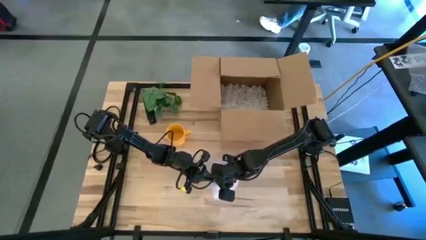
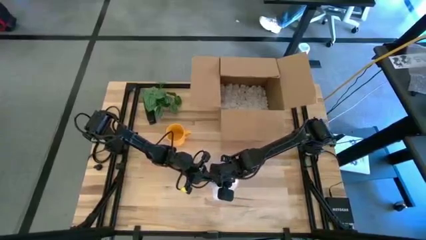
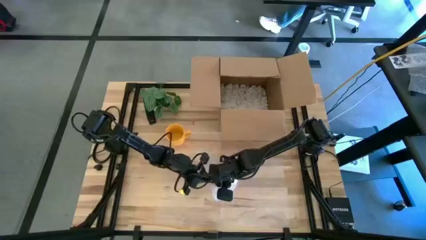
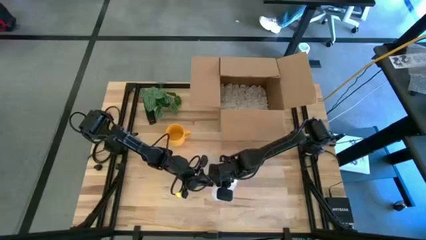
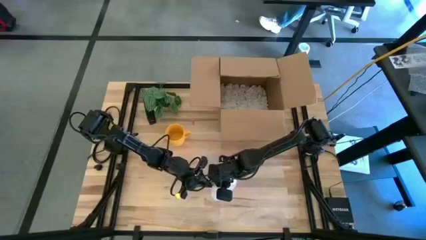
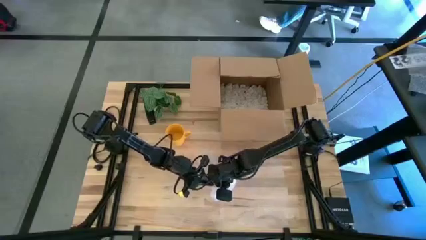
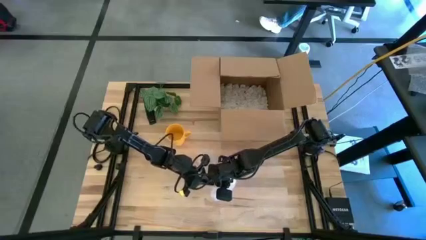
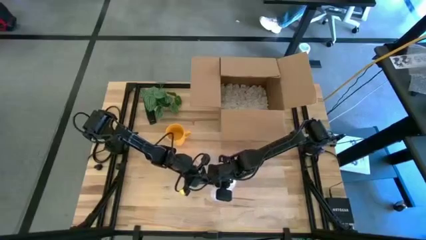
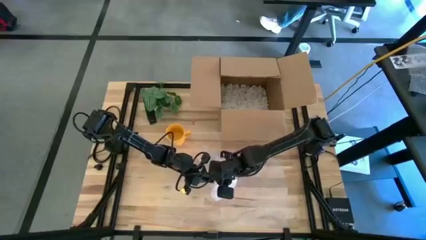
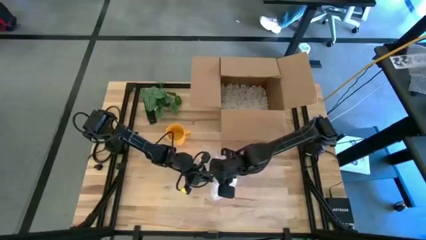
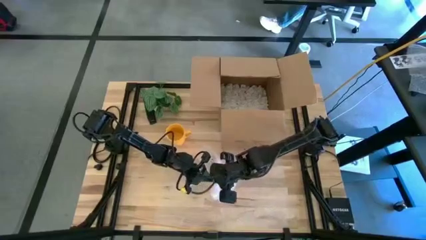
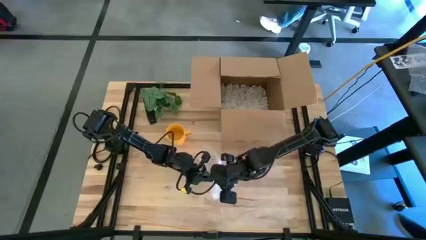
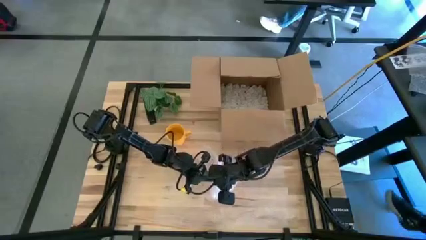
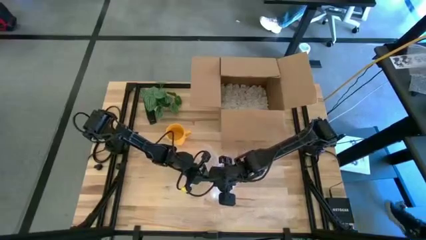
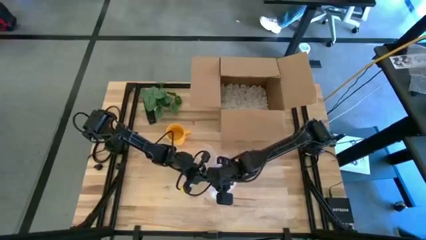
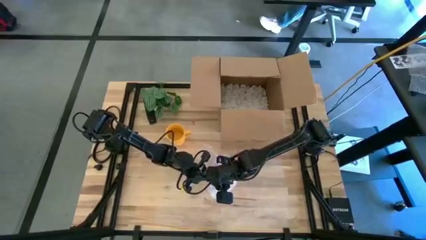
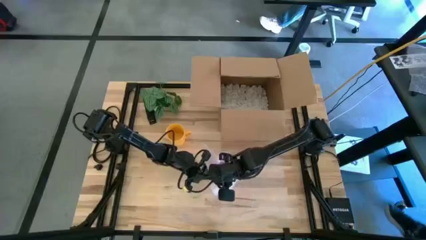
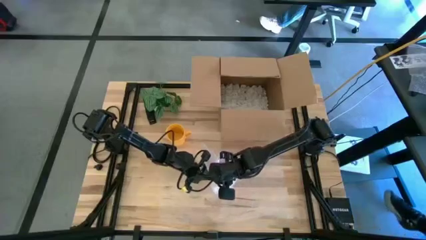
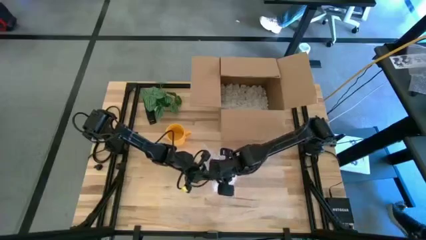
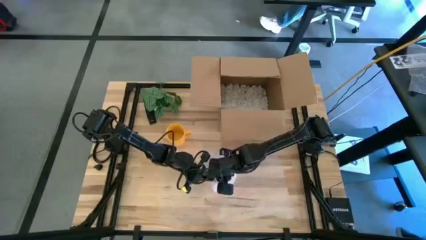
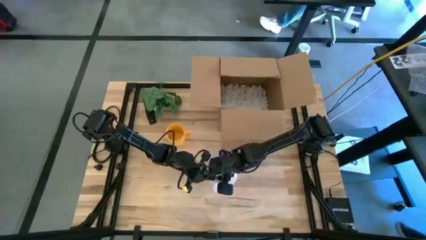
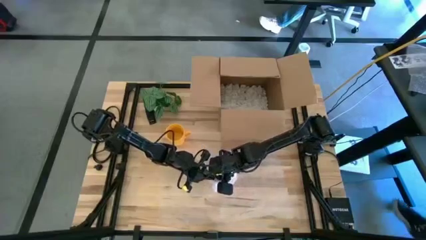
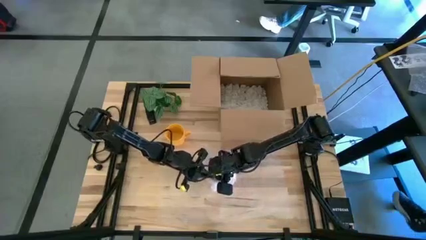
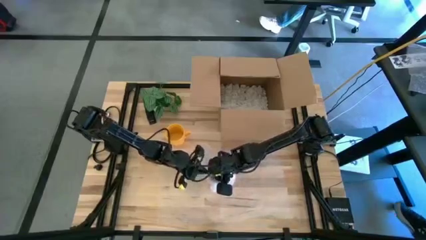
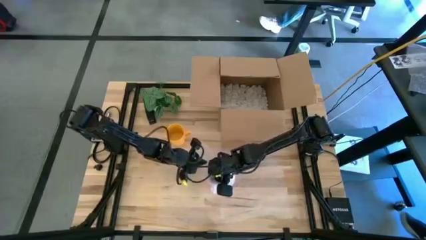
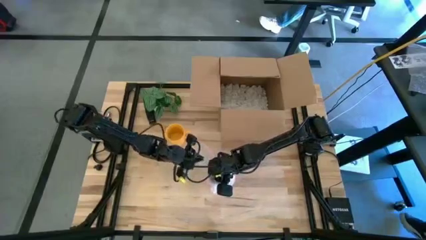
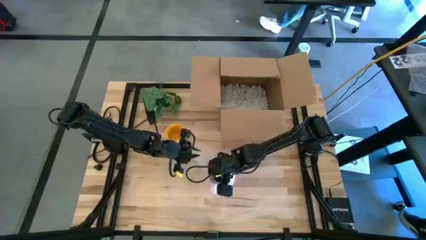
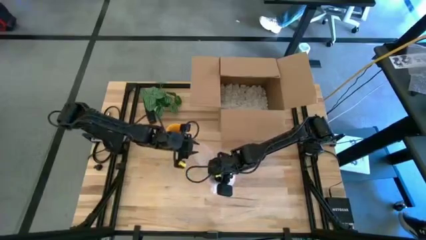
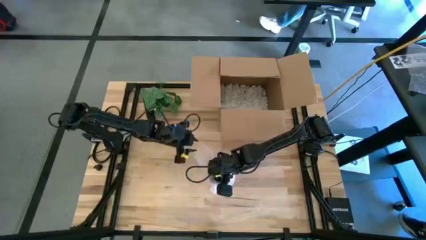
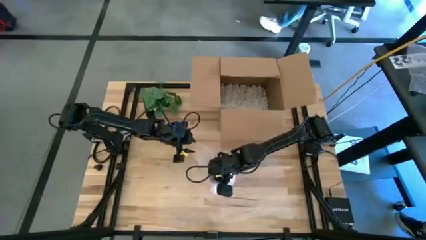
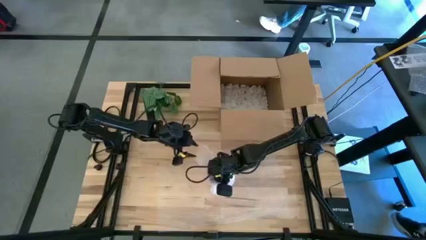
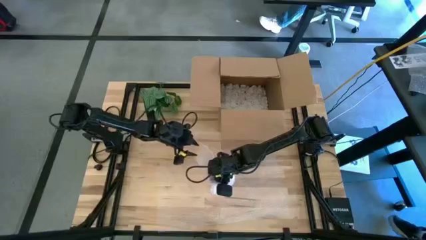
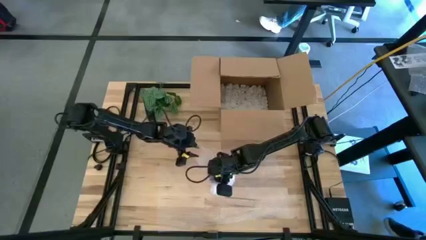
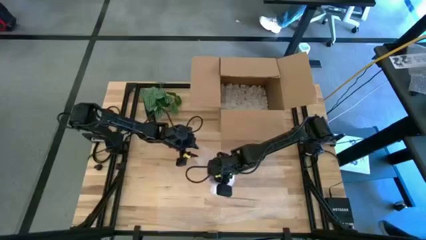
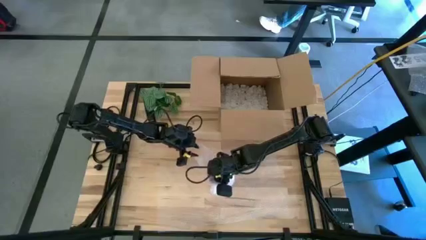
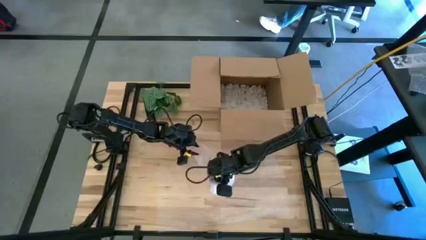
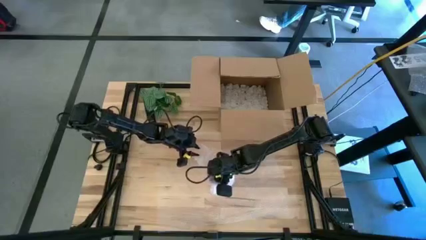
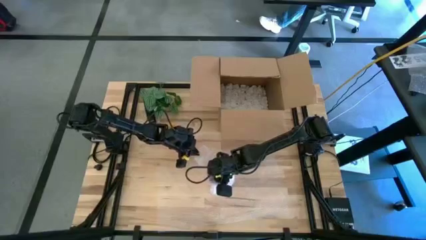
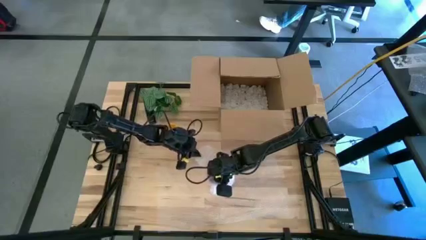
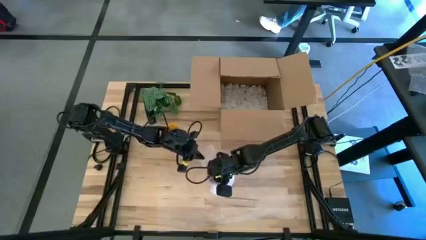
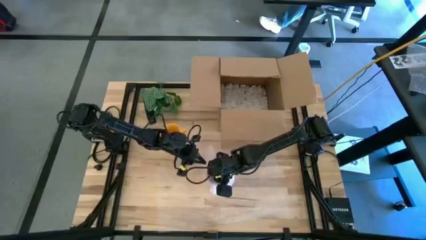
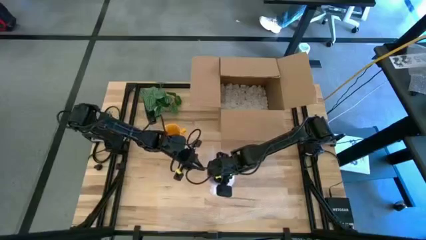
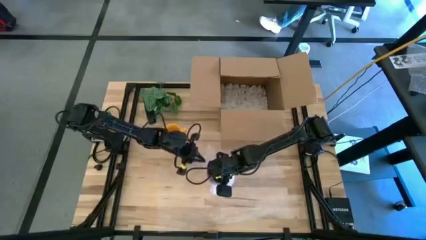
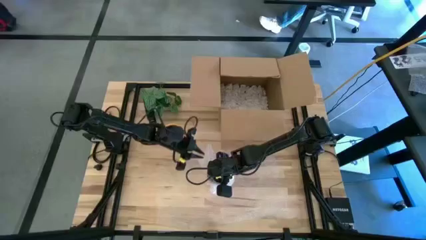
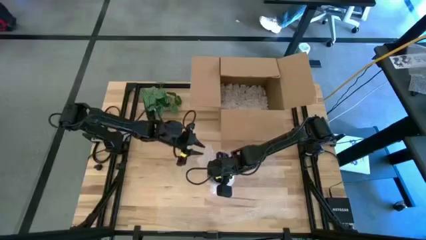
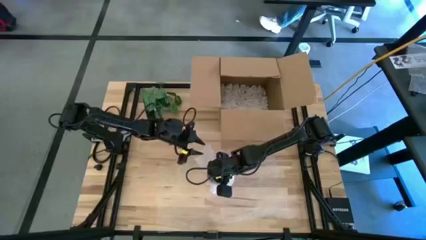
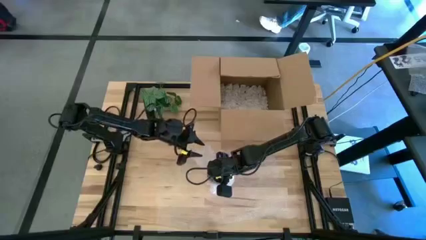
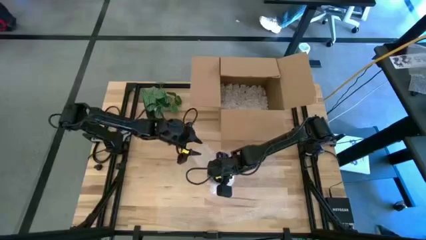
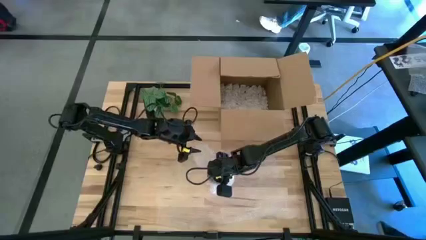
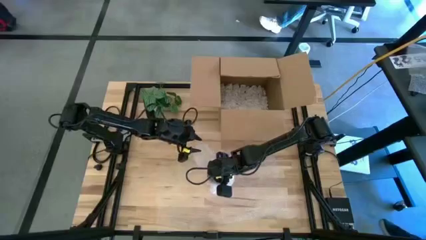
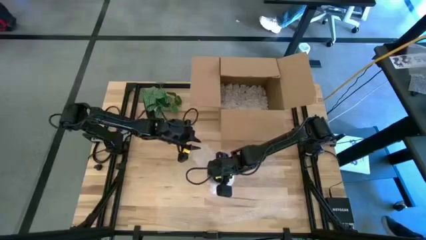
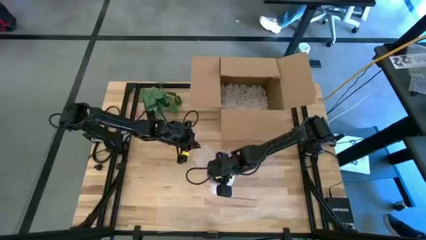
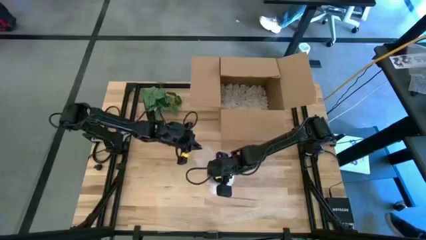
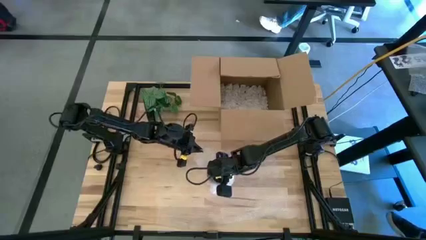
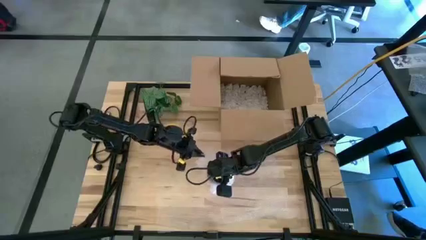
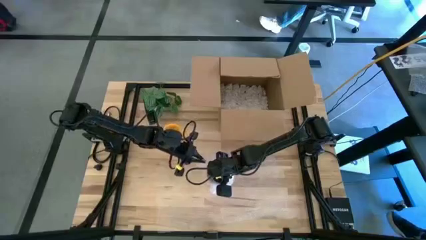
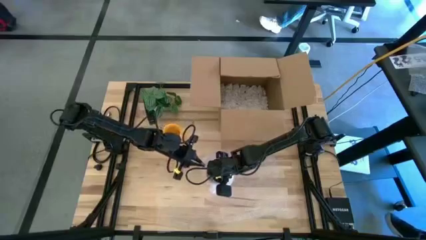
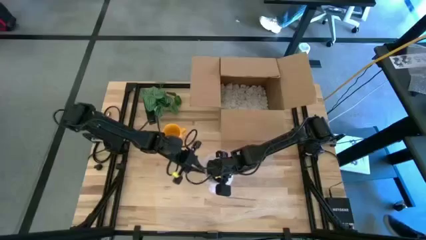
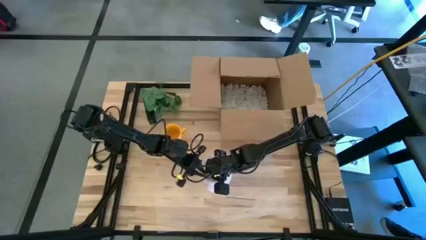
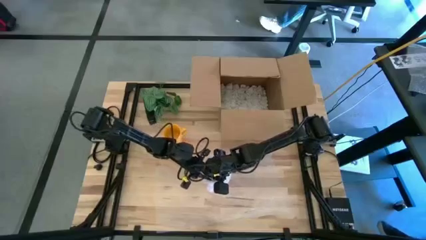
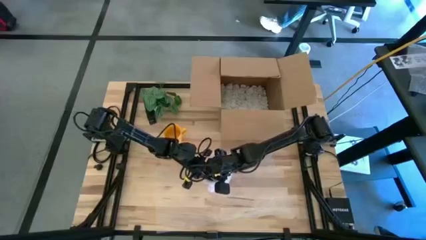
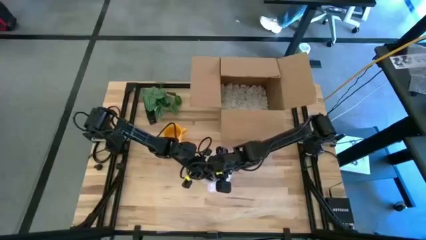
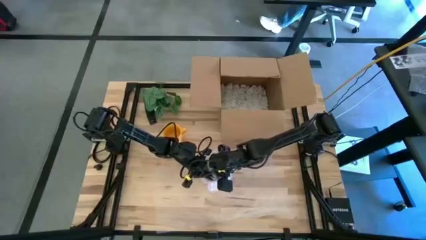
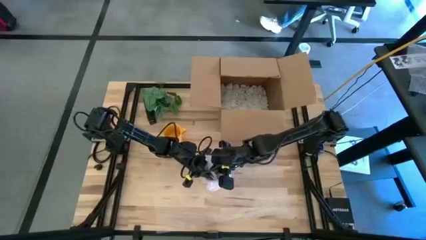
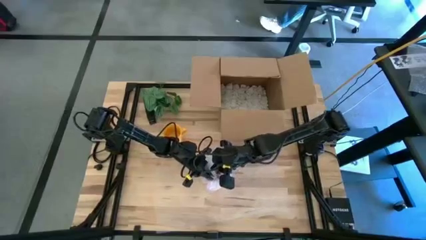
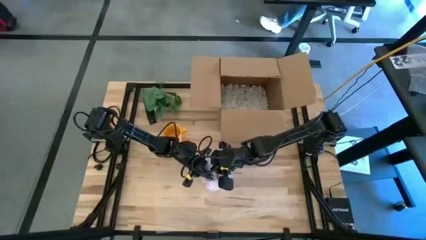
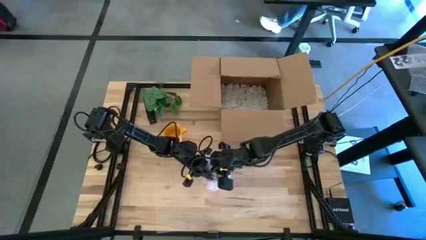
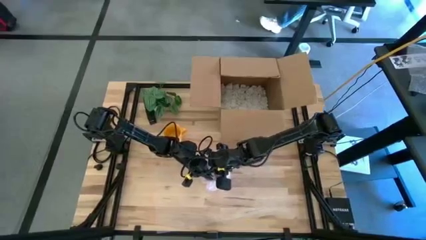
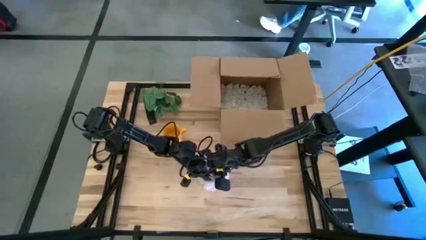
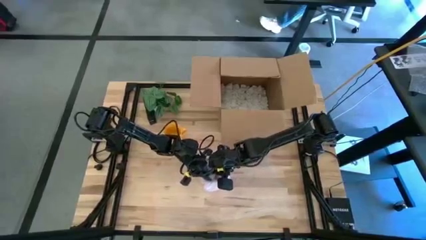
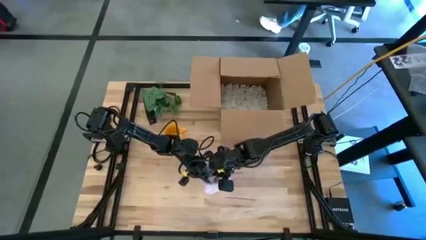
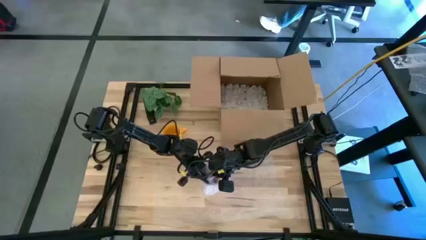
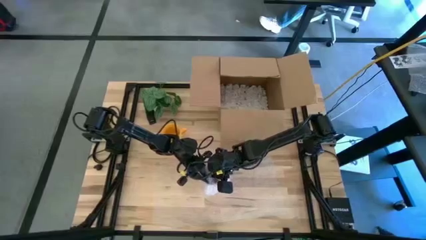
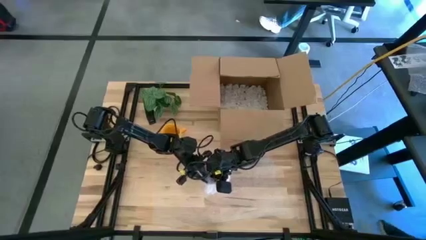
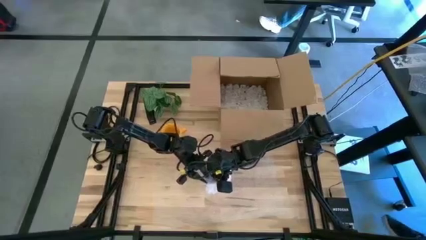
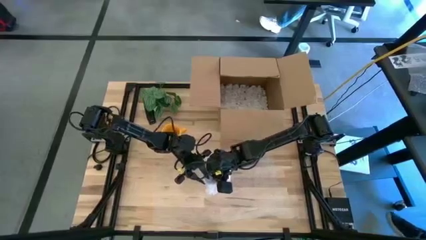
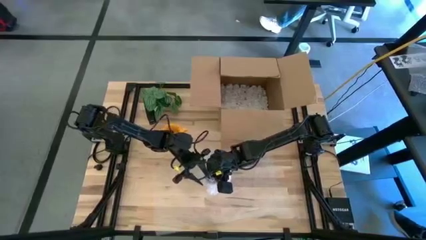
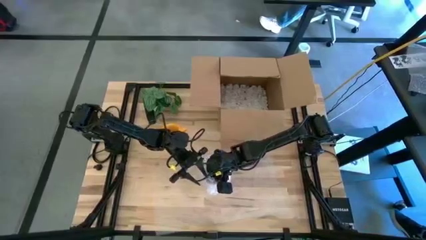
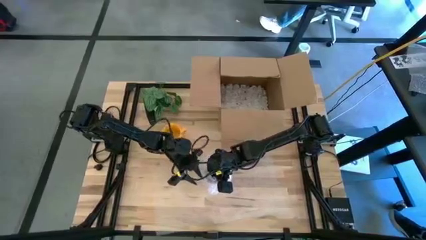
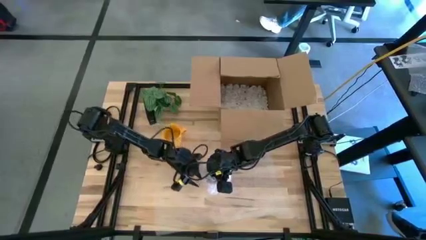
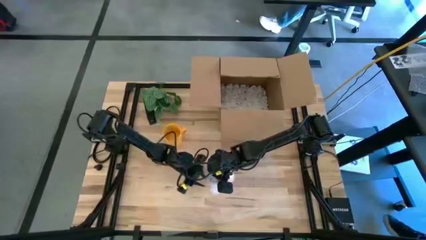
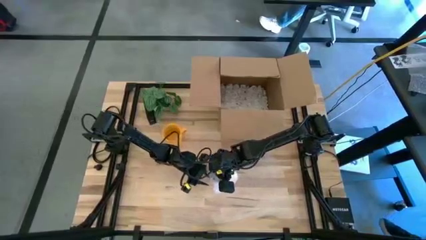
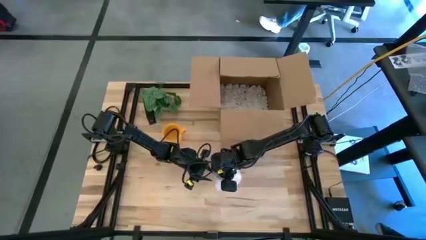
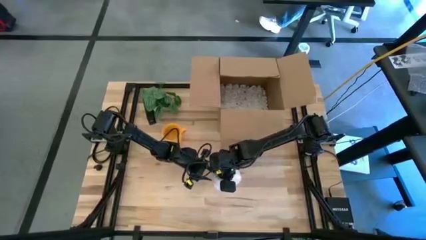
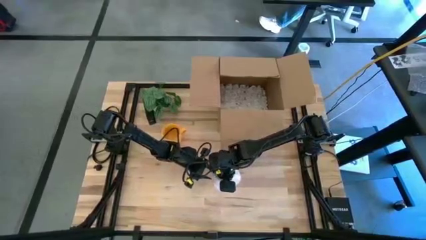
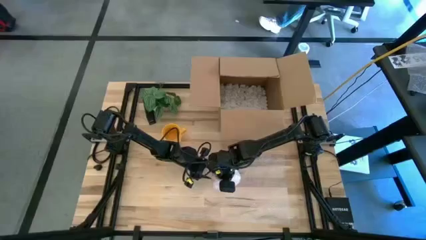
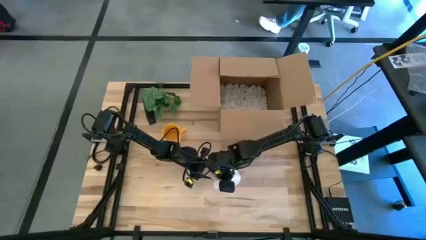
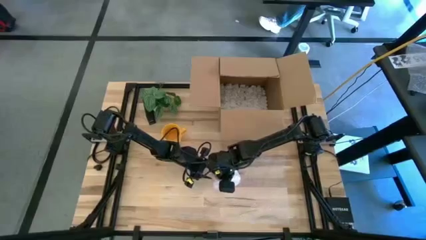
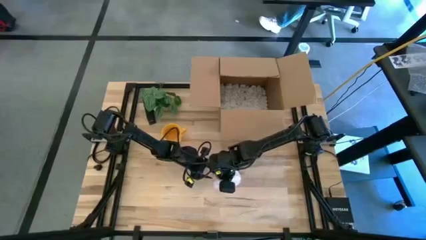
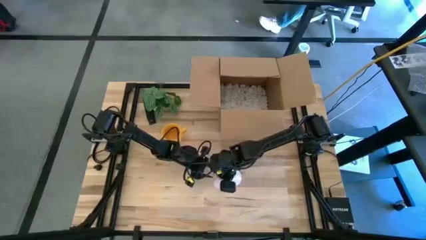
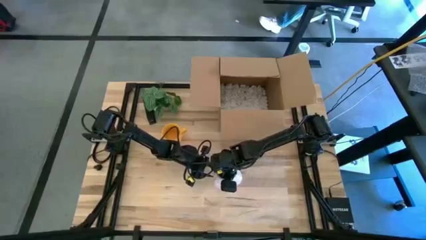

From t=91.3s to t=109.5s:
Task: wrap mug
Wrap the orange mug with the bubble wrap
